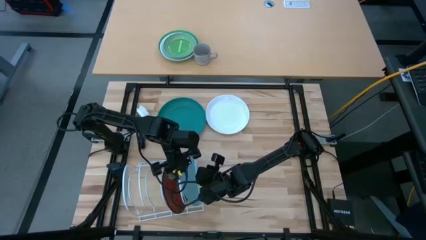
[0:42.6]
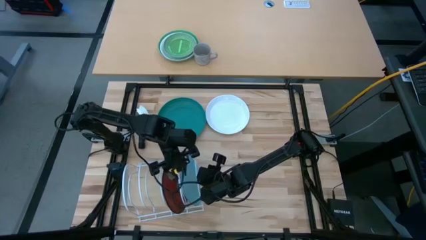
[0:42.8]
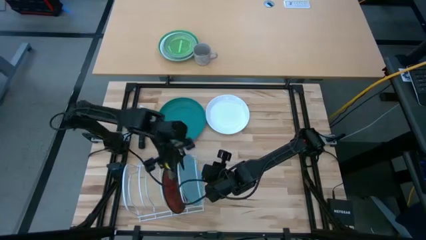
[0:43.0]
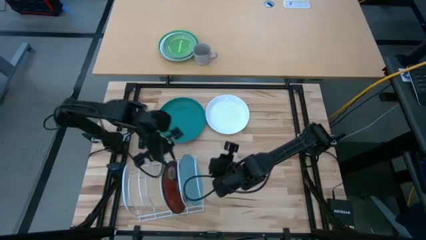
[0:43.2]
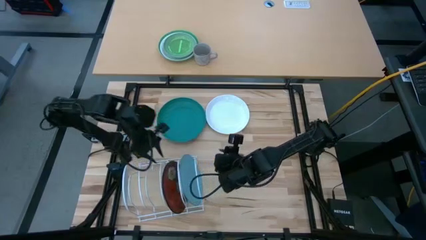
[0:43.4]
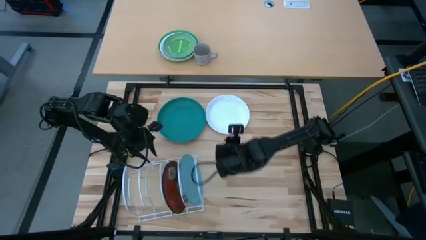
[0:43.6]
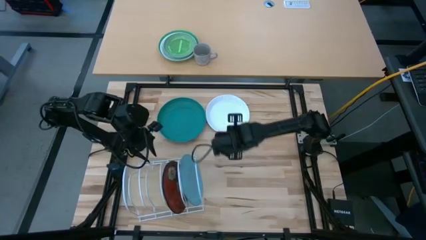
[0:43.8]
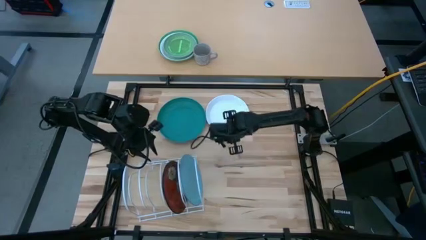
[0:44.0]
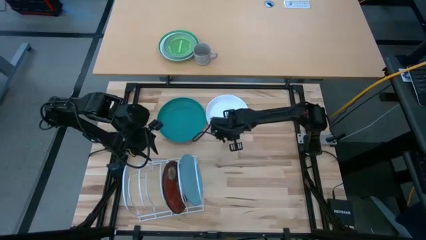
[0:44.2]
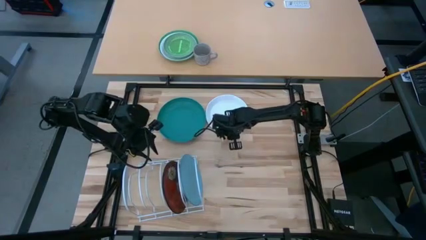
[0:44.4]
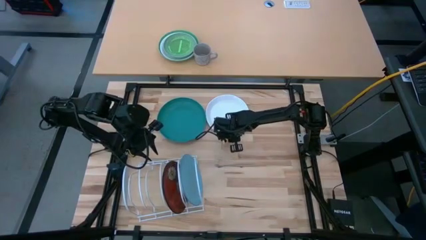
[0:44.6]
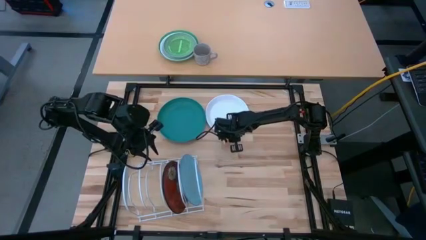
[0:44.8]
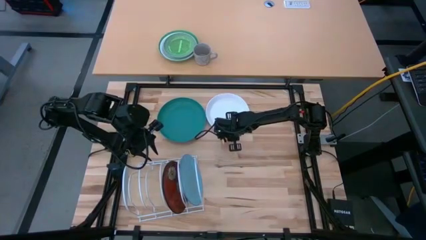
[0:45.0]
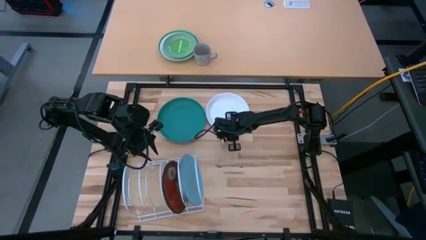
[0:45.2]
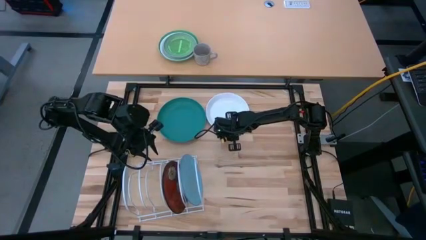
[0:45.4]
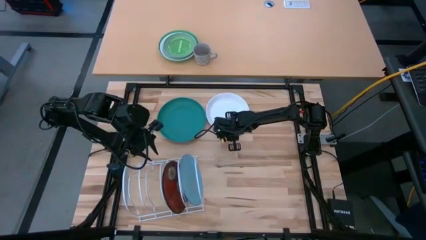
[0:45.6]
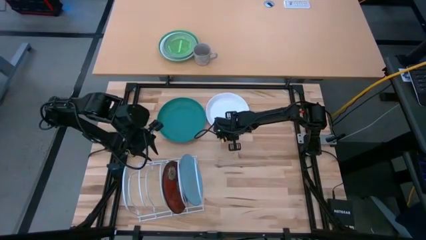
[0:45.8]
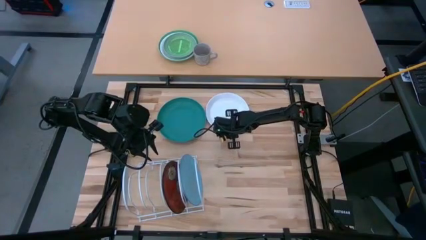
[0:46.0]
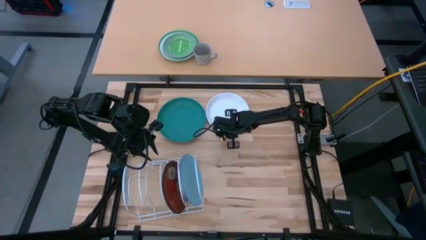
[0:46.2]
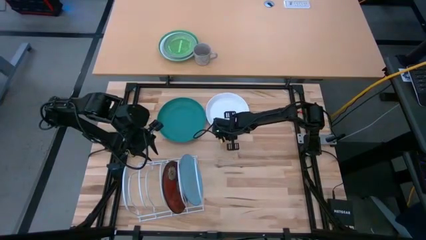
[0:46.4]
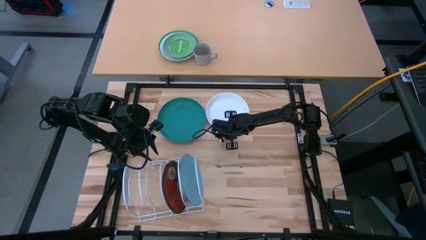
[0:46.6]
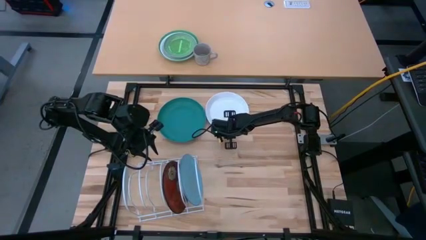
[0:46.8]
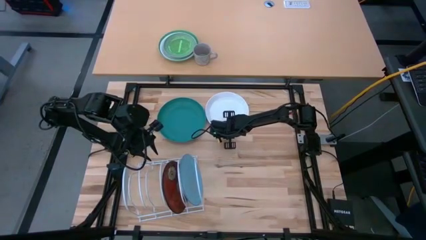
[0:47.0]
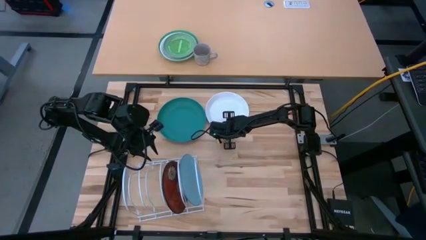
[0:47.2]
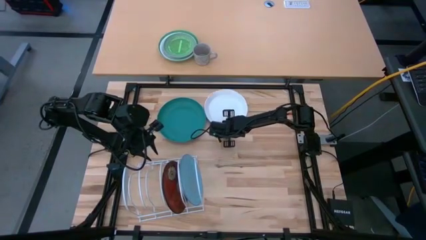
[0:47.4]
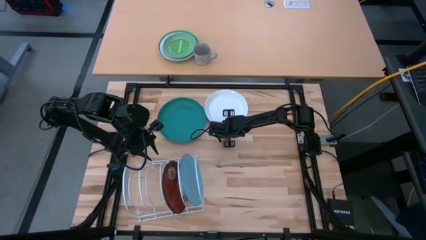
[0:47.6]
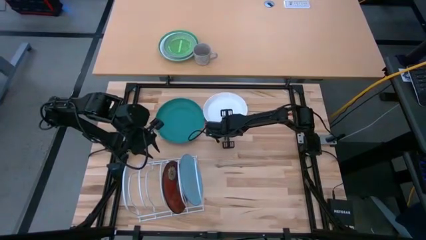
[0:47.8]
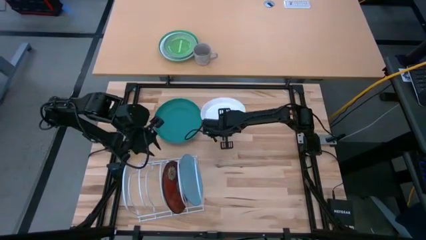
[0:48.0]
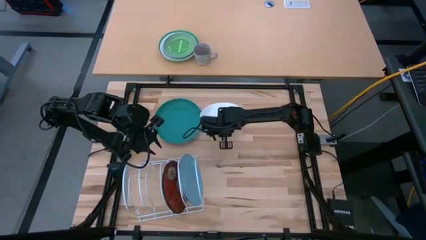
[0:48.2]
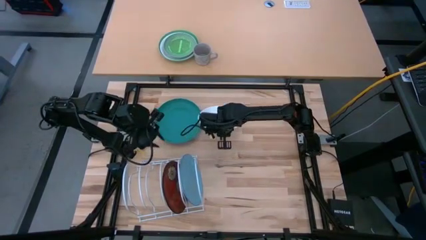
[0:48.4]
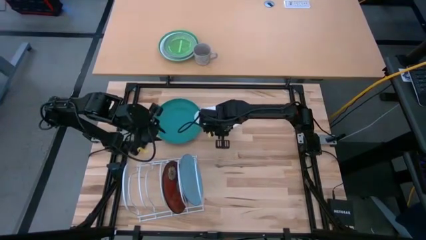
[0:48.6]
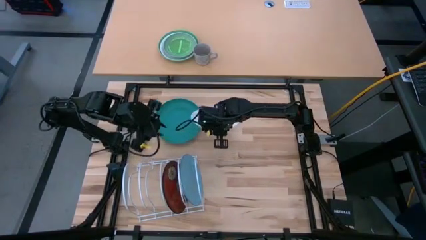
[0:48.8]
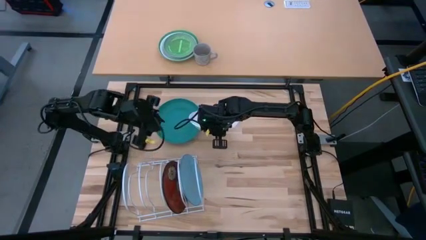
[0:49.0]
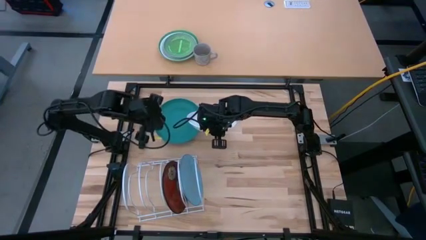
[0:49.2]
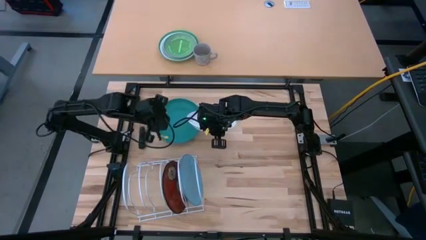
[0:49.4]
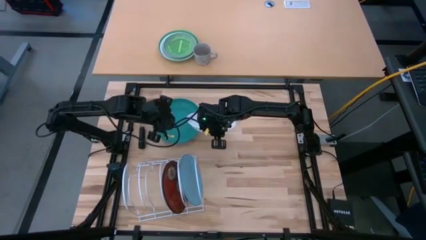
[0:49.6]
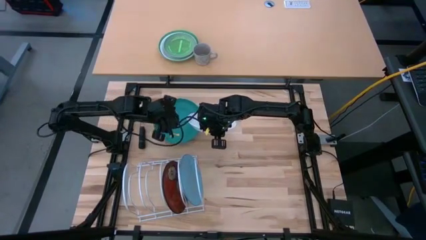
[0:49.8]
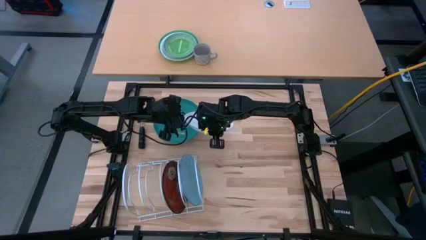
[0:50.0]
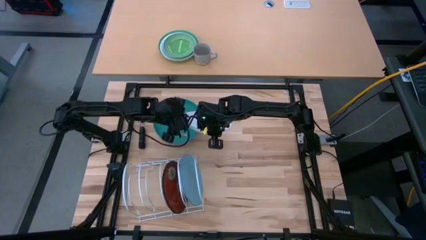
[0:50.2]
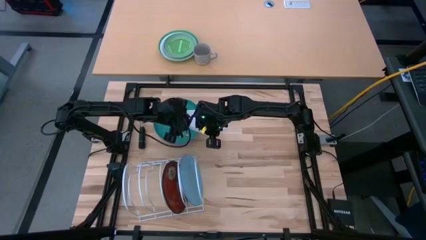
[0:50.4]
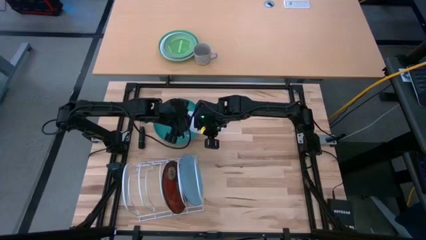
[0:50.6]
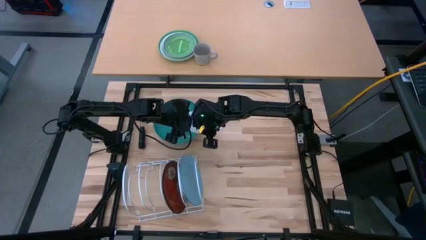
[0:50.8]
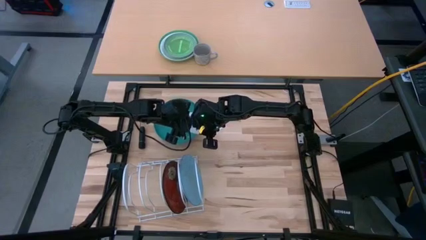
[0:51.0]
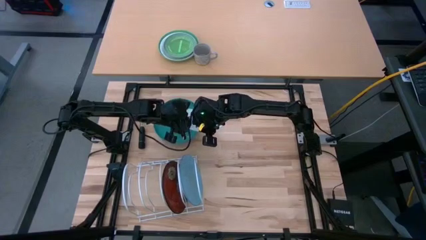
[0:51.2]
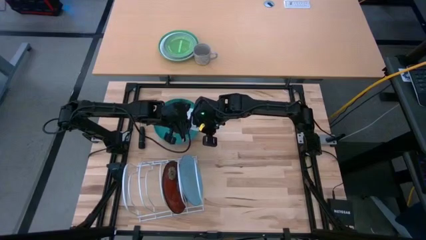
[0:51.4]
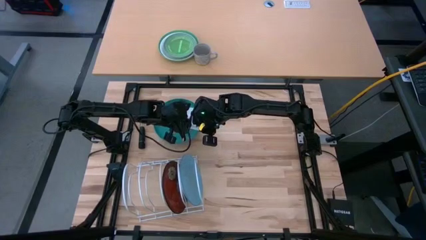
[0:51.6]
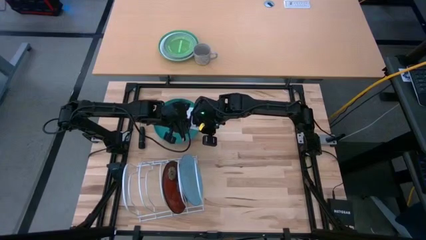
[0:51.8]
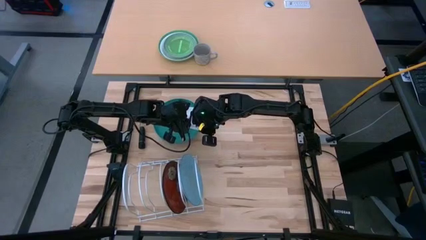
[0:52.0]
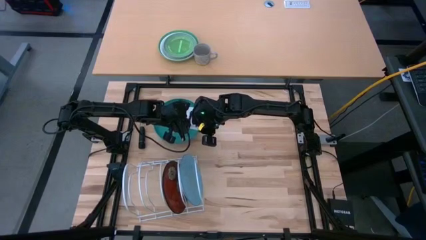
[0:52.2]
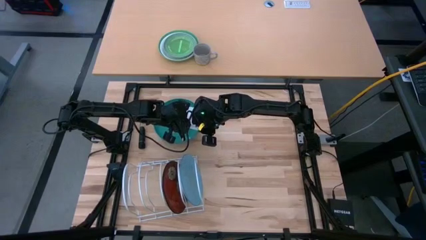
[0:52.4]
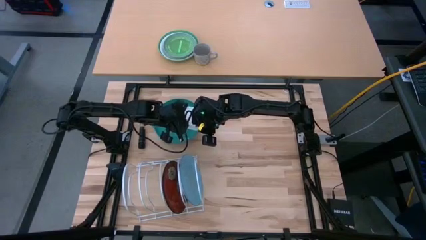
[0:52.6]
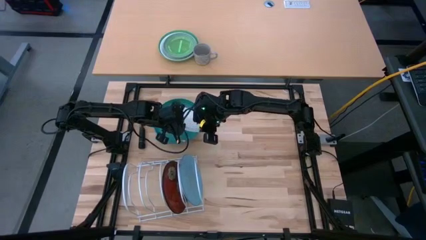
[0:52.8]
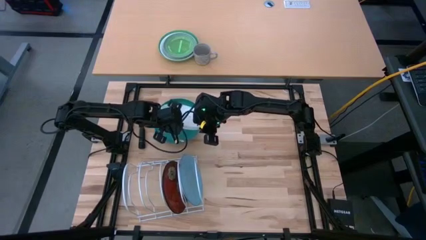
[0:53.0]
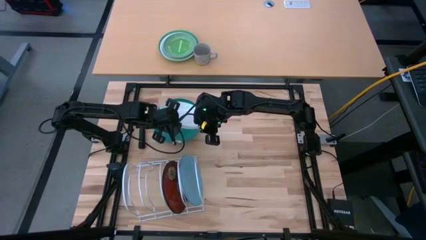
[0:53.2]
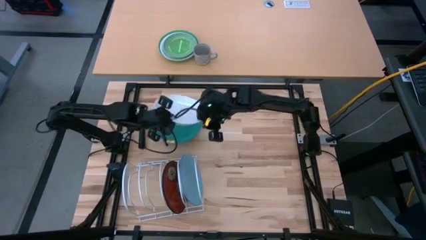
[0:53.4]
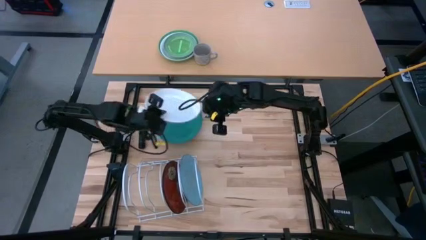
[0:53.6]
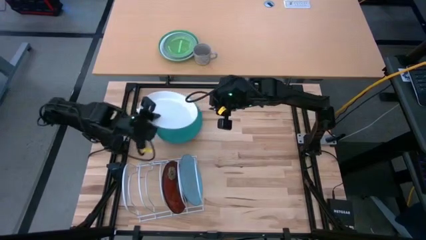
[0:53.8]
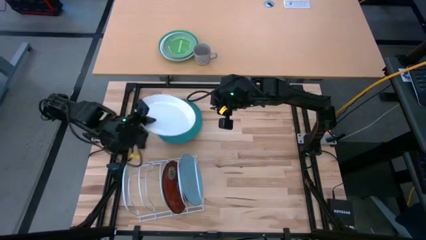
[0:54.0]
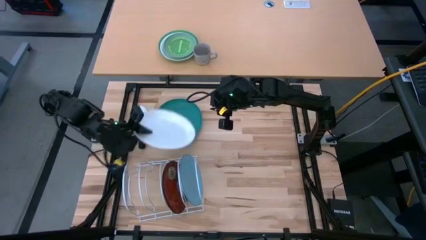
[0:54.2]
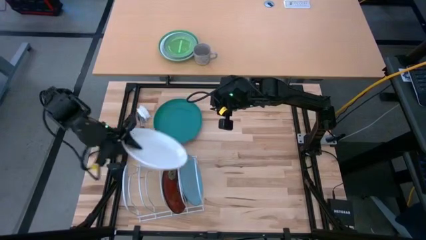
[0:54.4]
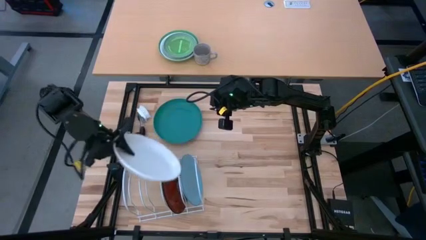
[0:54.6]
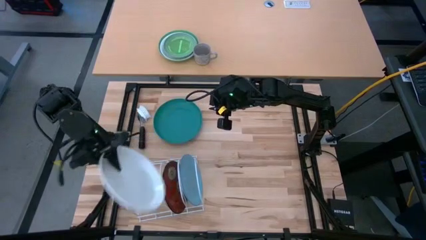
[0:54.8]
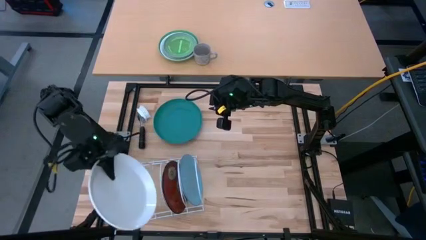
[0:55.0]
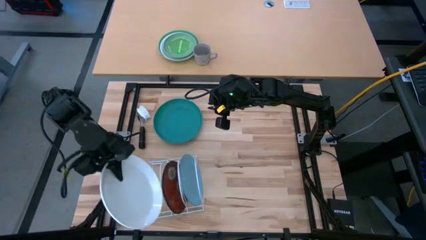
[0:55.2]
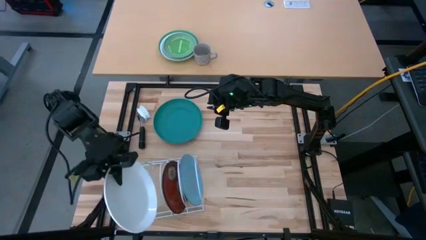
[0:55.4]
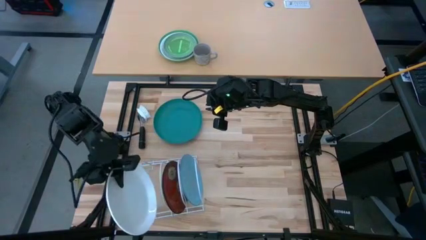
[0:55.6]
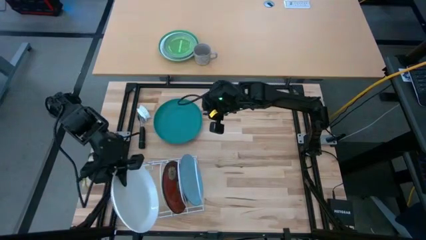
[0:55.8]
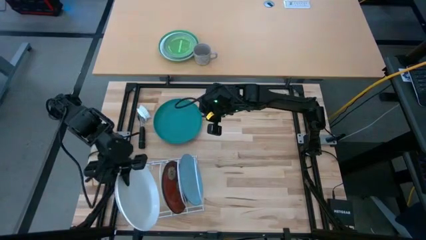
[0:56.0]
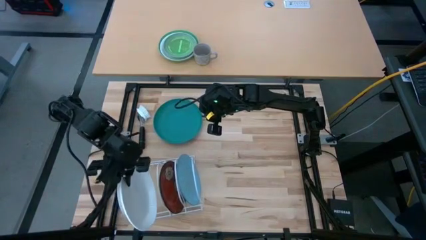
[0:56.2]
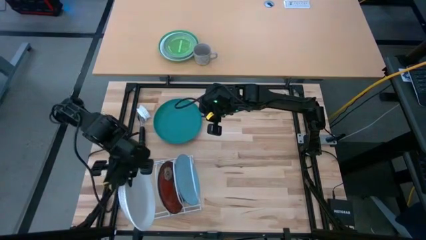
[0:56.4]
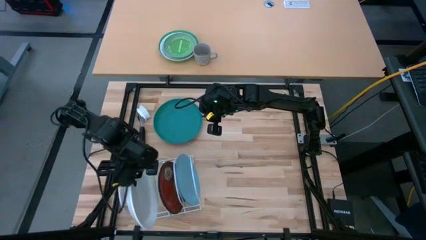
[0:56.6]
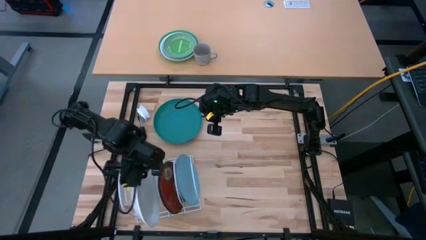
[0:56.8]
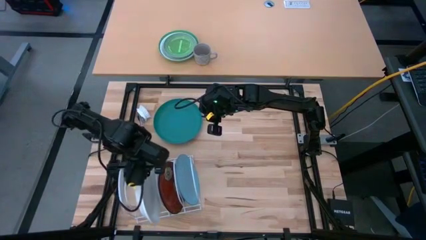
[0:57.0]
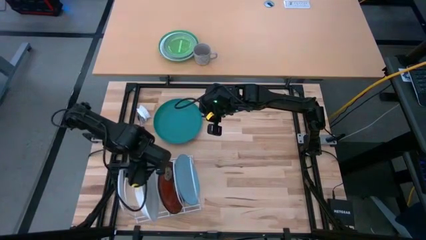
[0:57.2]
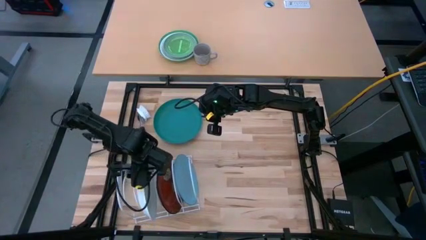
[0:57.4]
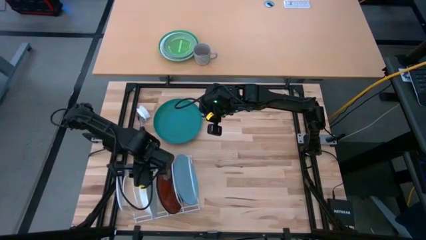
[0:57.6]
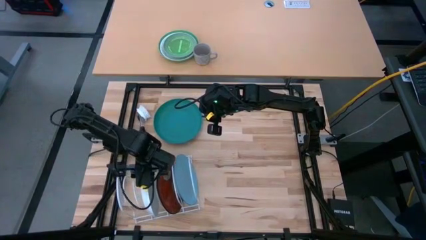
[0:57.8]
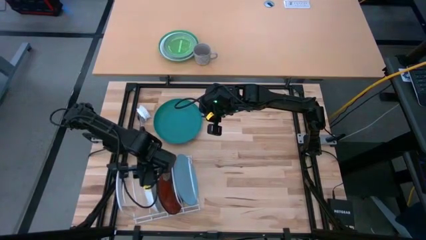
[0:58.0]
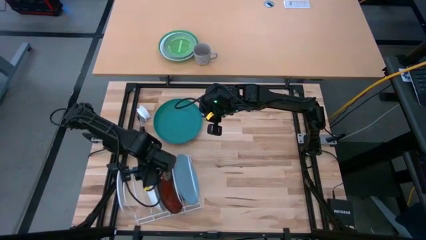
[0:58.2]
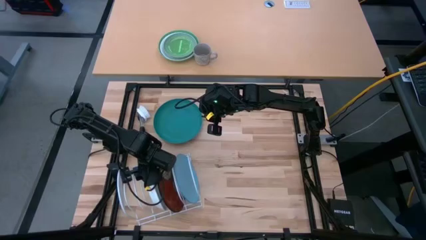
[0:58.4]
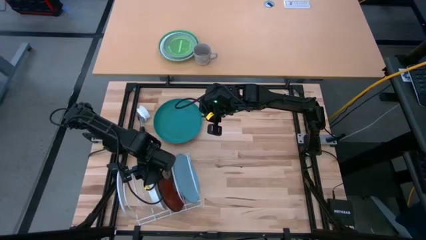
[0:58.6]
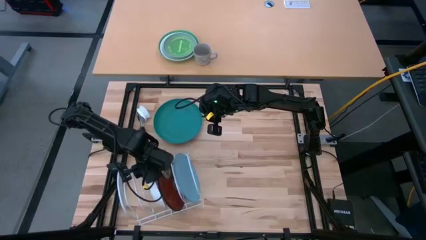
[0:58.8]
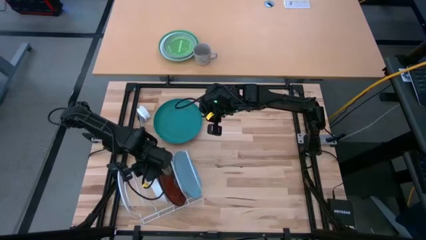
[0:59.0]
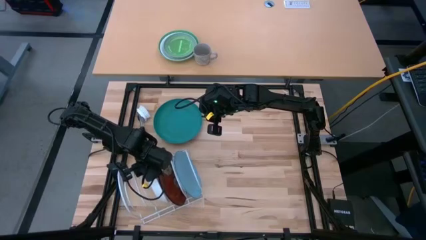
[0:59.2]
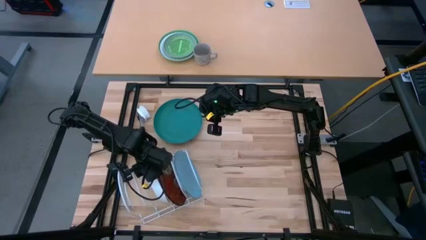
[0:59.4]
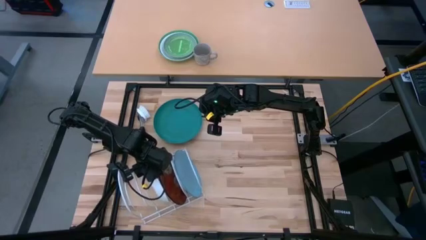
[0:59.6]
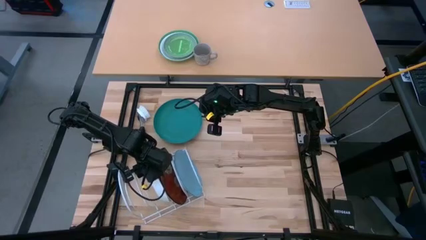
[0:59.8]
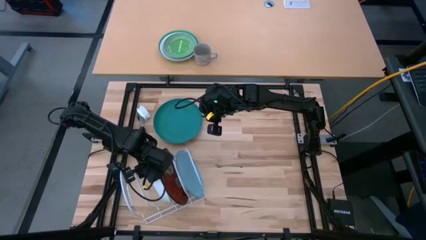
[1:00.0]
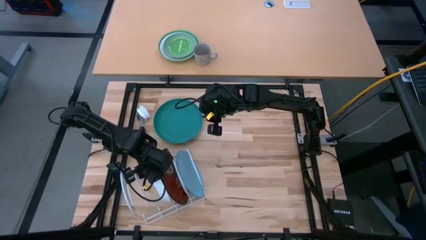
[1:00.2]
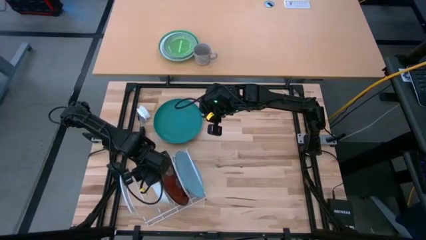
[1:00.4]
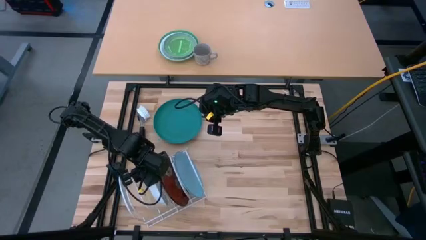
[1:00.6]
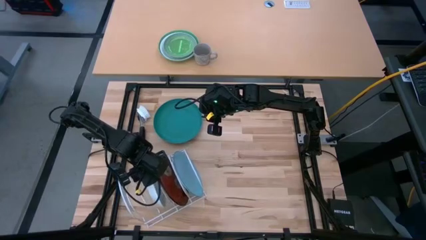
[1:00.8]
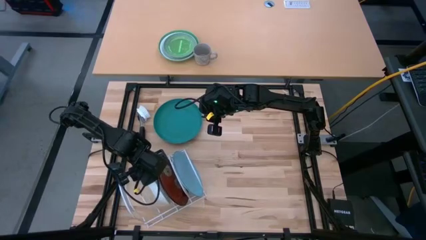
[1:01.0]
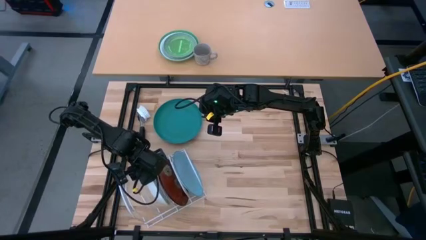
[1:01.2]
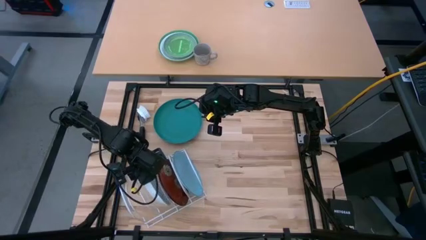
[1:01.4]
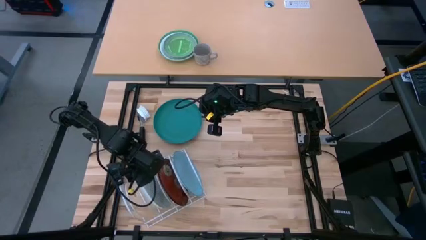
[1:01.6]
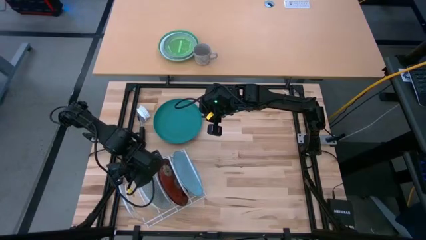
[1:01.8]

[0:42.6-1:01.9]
Task: Sort dishes
Put the white plate into the dish rack
